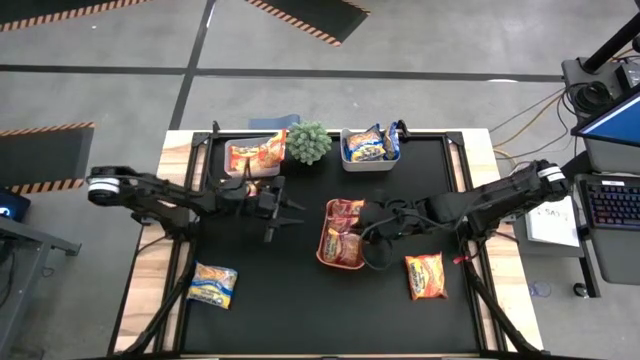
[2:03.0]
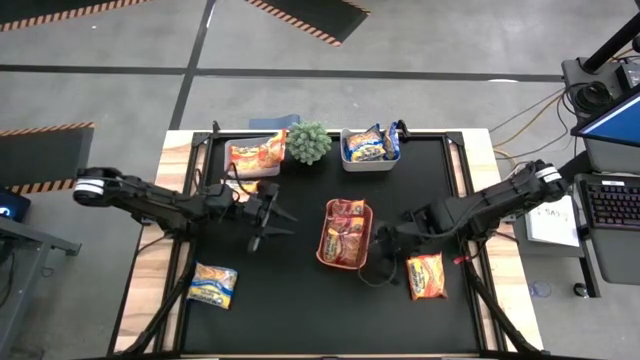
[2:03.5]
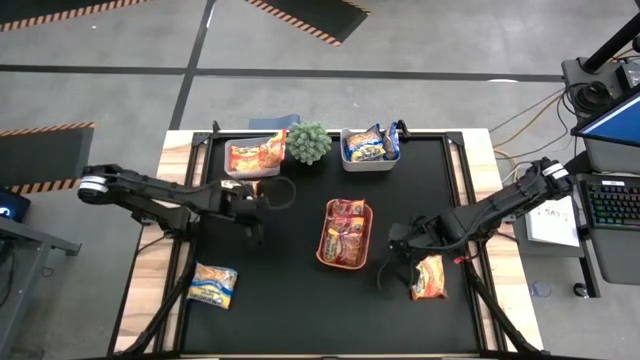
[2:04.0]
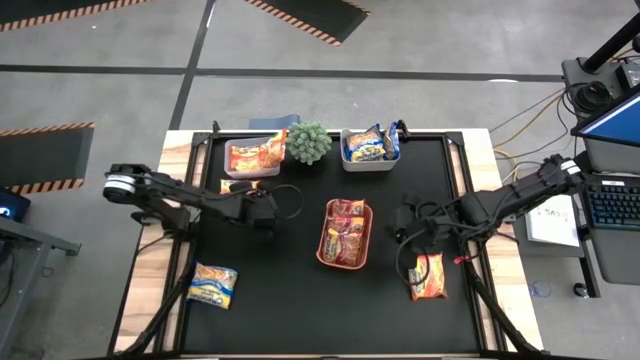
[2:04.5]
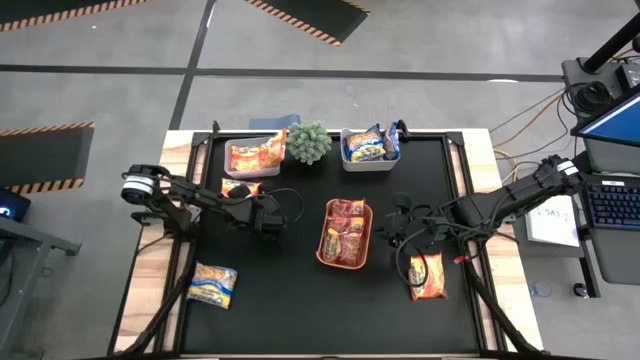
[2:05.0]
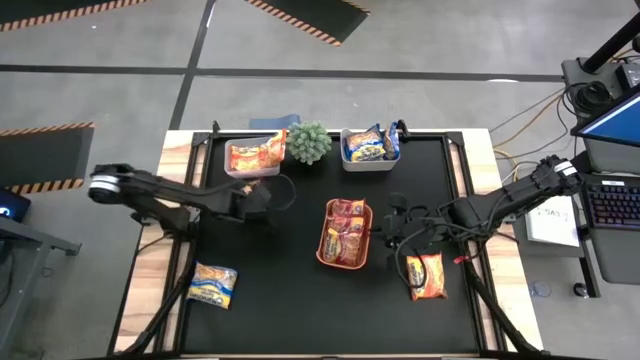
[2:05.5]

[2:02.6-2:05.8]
Task: Sort Maruchan noodles
Put the orange noodle pack into the transparent bin

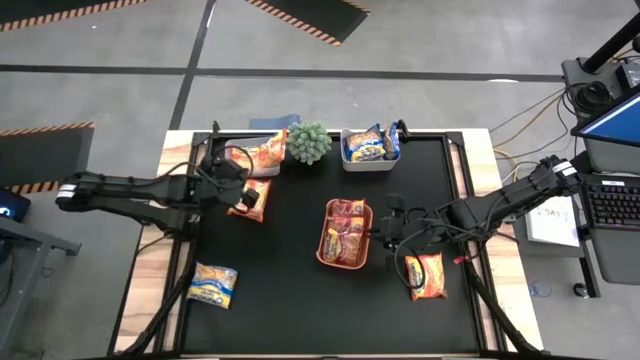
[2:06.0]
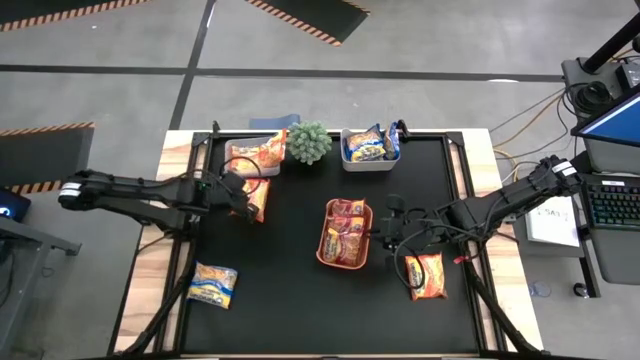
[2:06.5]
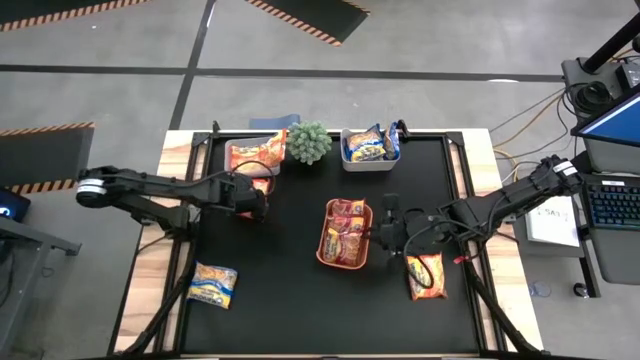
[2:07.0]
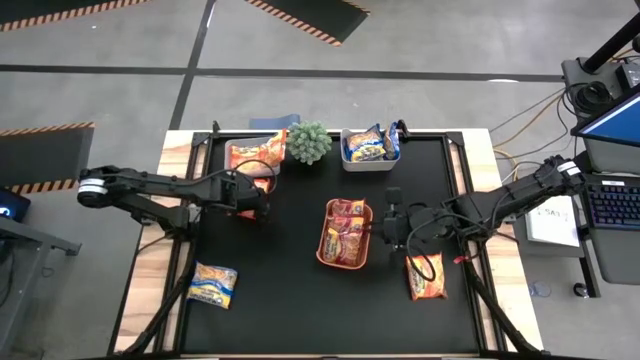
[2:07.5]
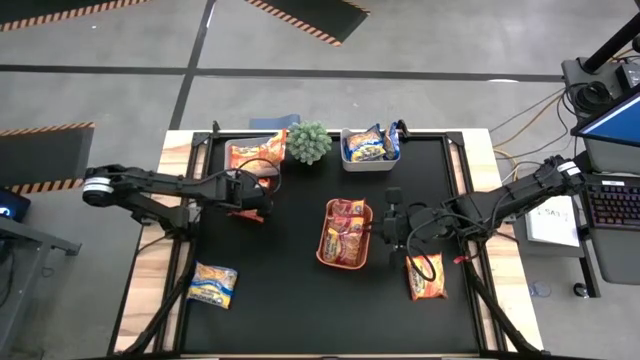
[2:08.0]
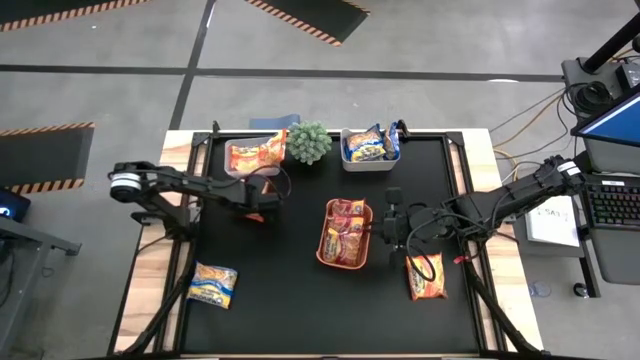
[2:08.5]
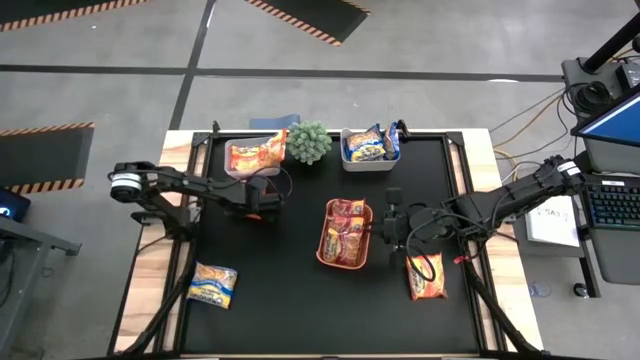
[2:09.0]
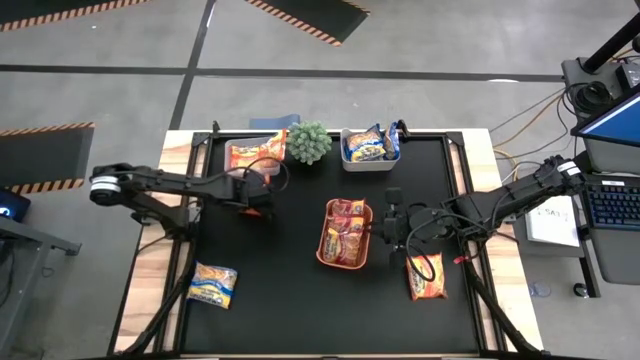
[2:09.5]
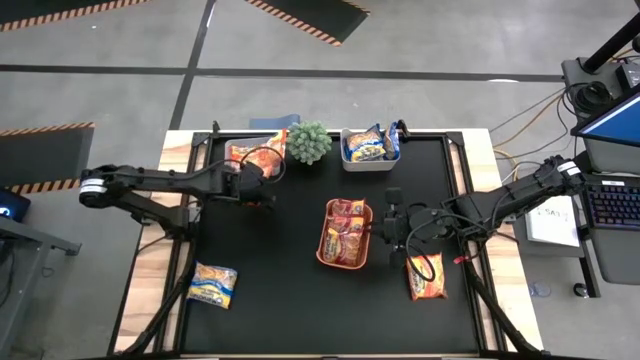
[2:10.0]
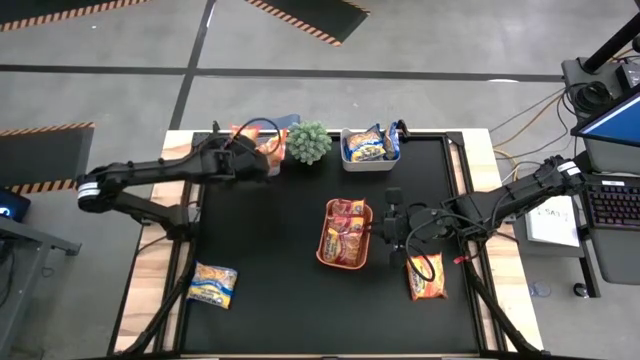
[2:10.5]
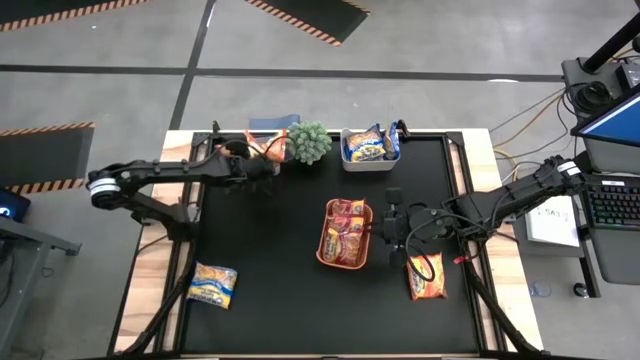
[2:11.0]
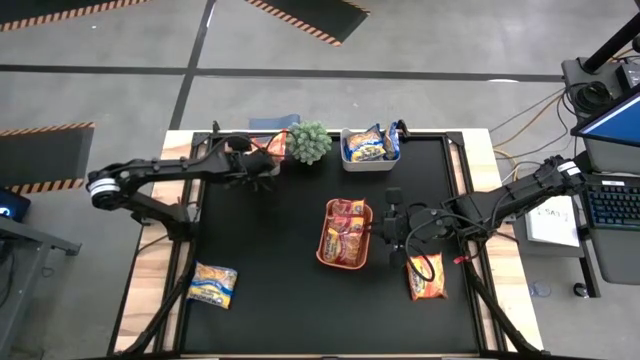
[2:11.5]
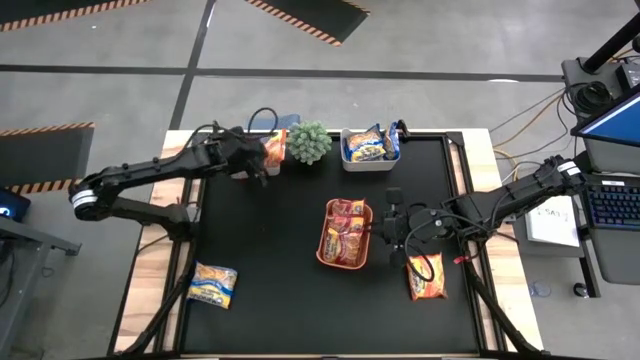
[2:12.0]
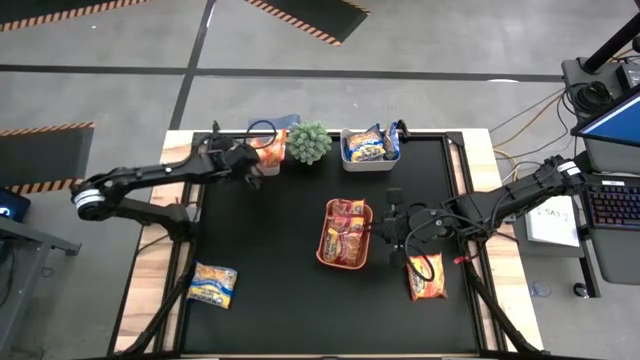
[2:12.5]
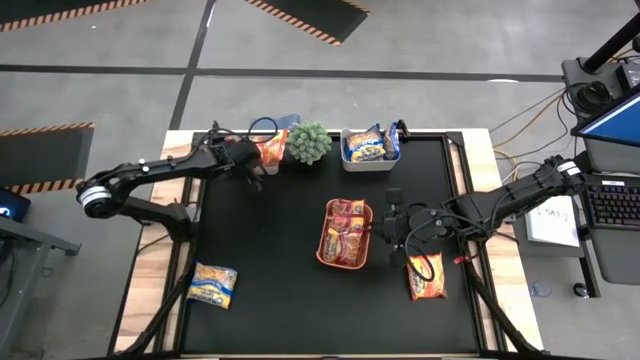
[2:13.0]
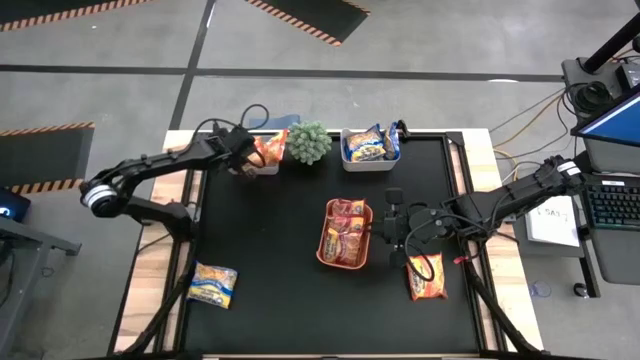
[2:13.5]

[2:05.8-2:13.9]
Put the orange noodle pack into the transparent bin

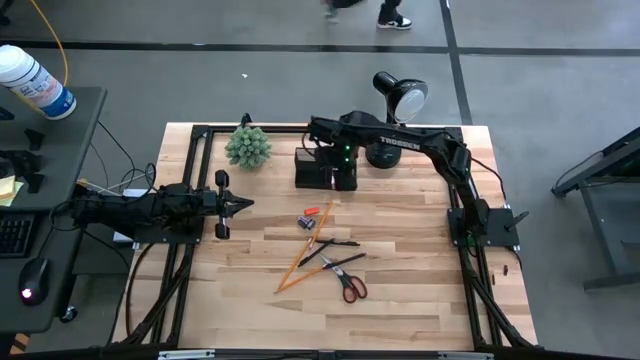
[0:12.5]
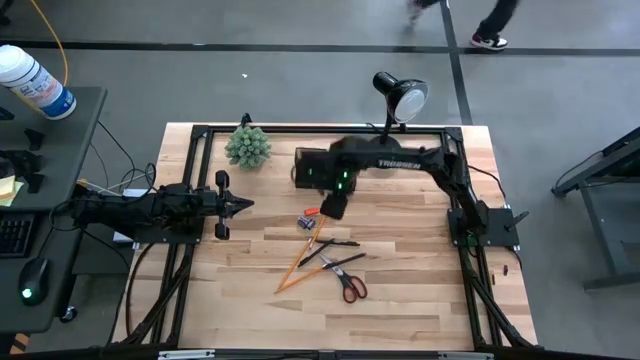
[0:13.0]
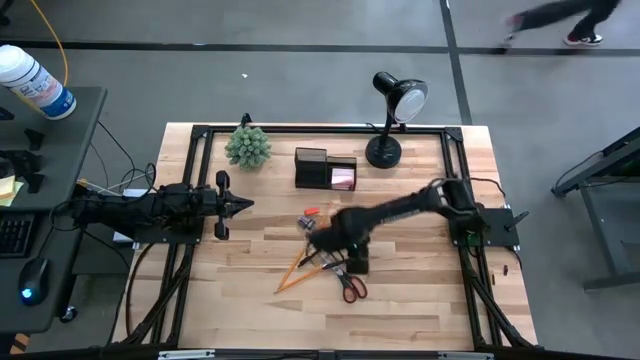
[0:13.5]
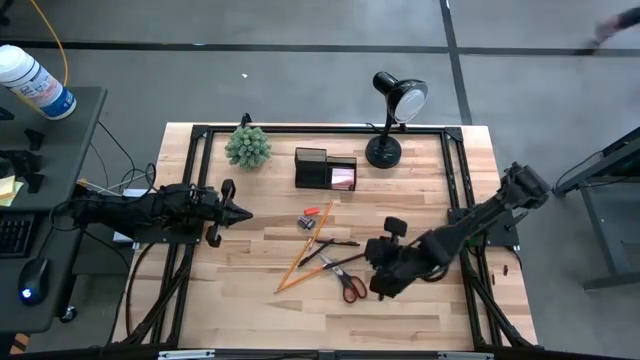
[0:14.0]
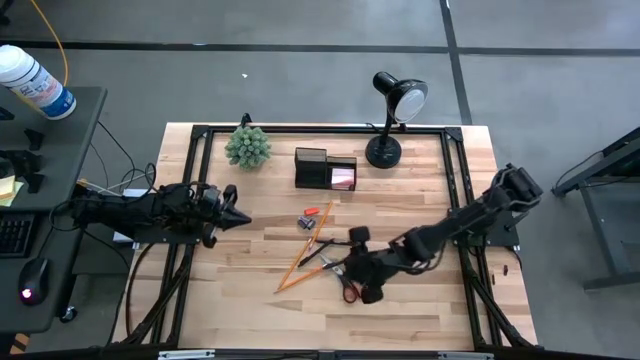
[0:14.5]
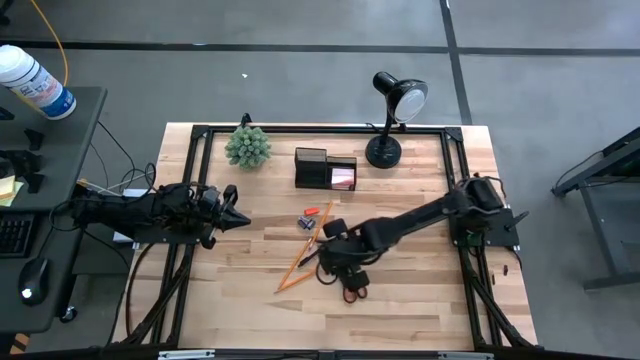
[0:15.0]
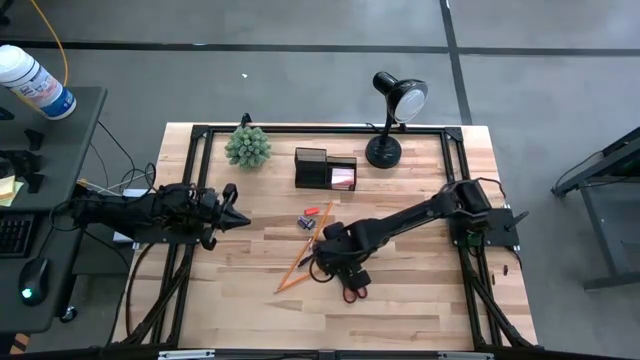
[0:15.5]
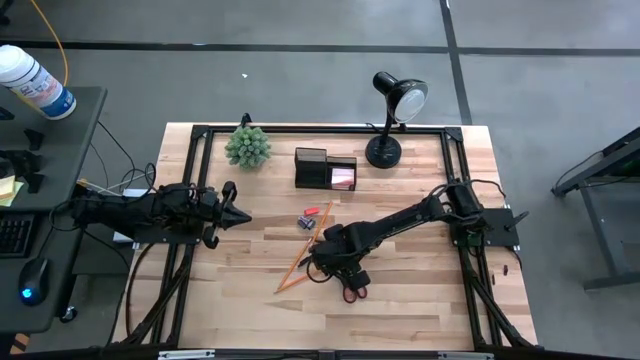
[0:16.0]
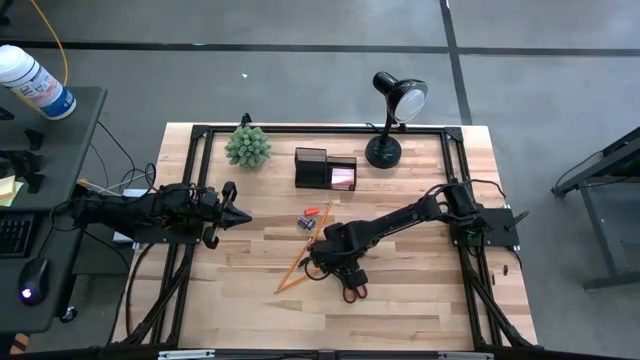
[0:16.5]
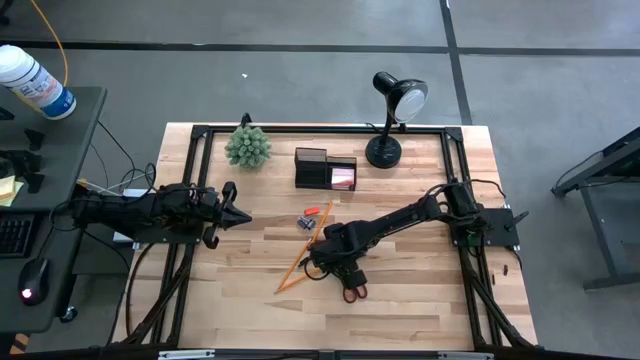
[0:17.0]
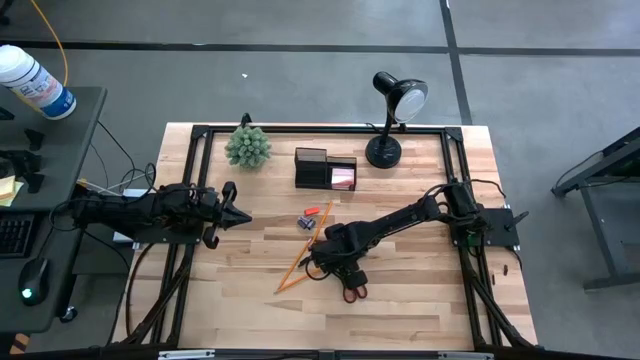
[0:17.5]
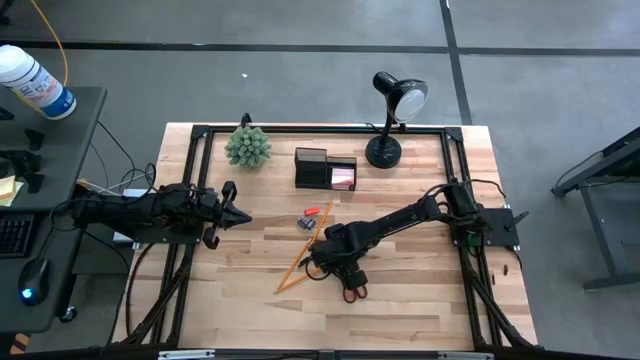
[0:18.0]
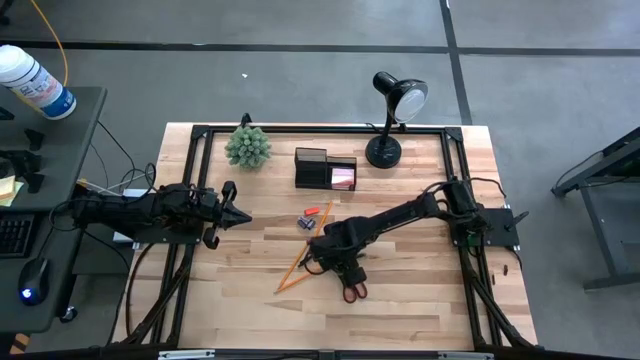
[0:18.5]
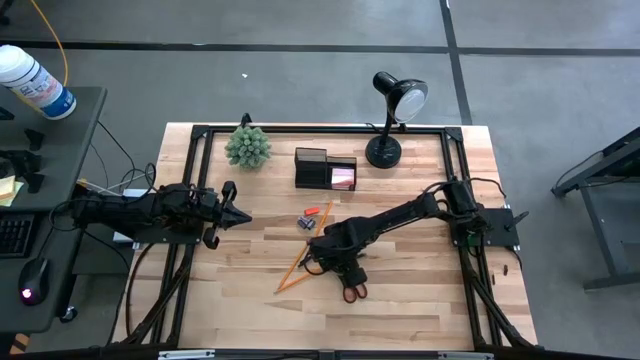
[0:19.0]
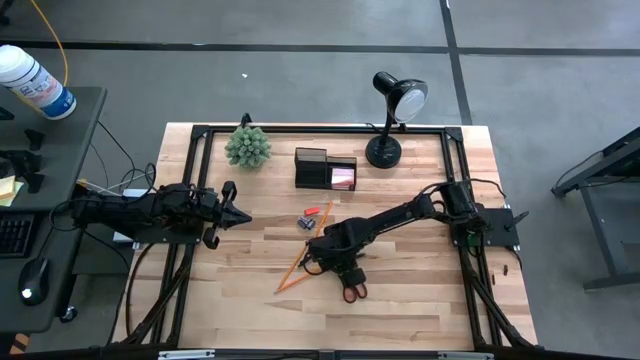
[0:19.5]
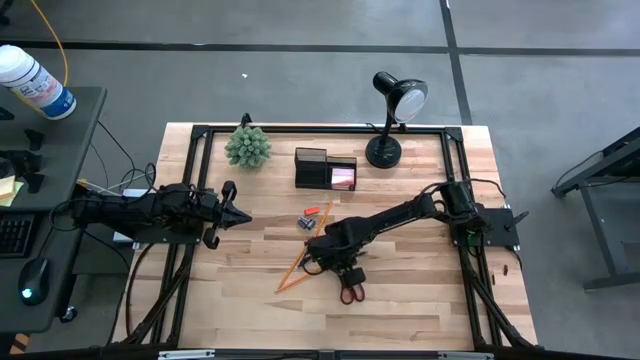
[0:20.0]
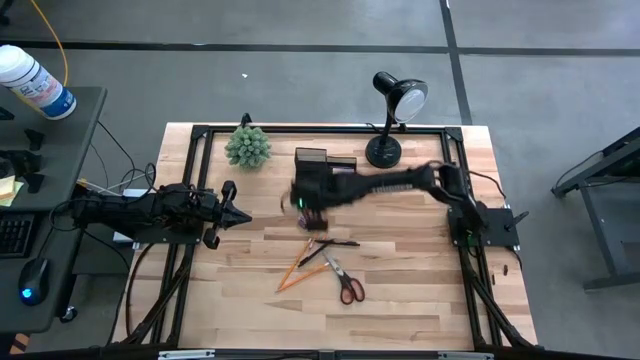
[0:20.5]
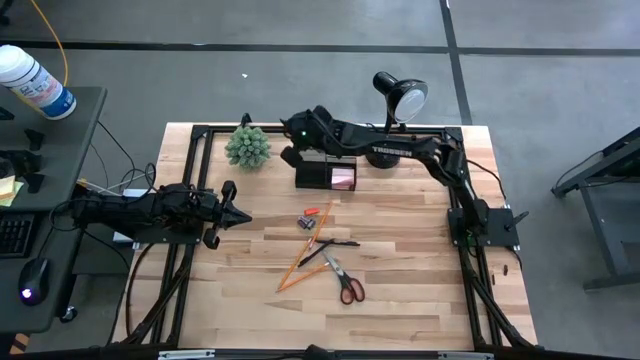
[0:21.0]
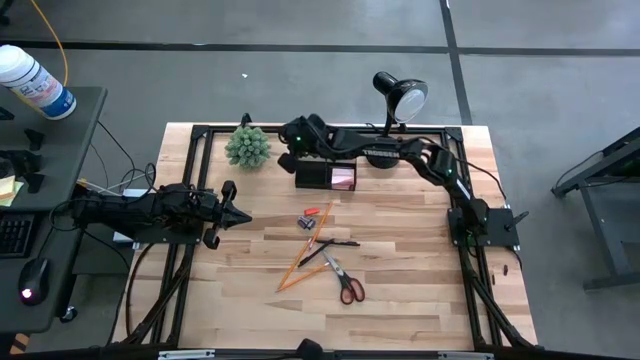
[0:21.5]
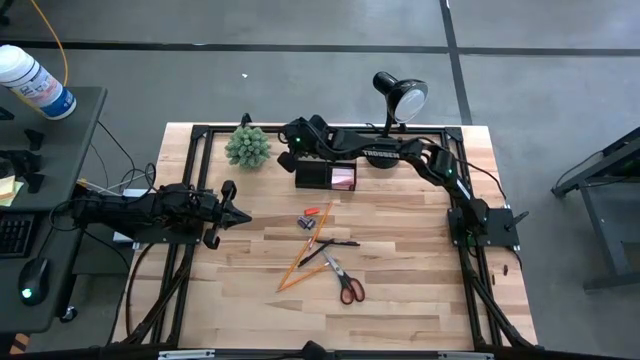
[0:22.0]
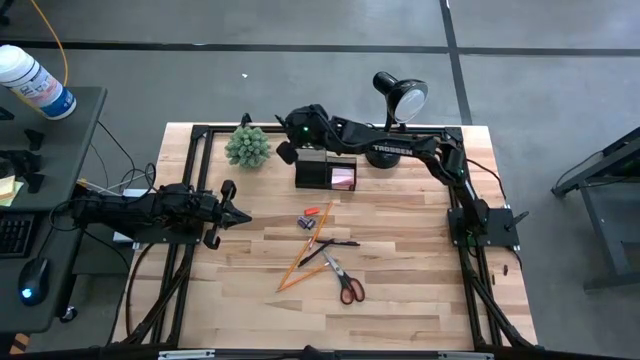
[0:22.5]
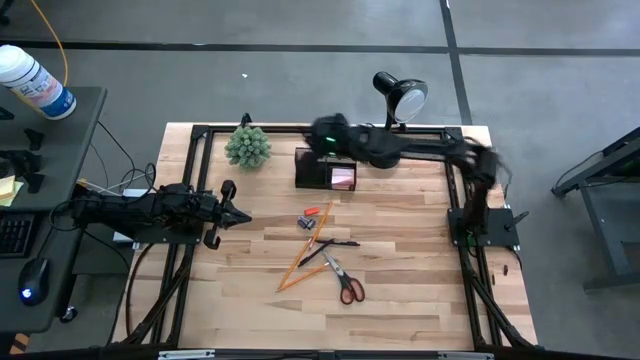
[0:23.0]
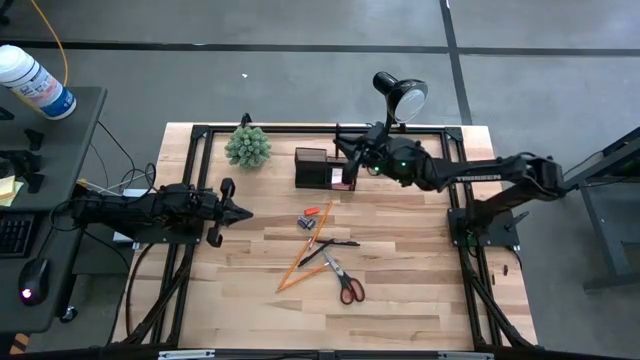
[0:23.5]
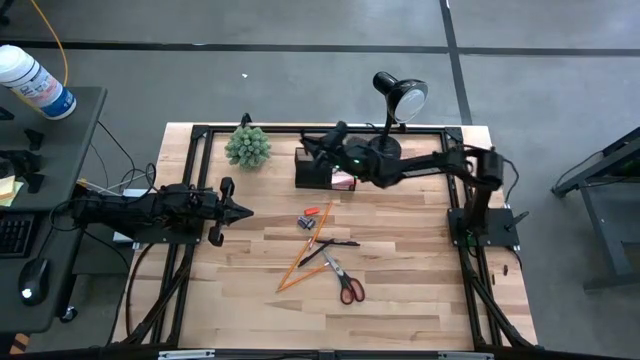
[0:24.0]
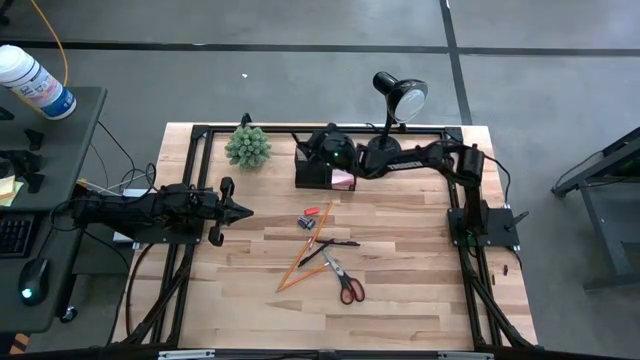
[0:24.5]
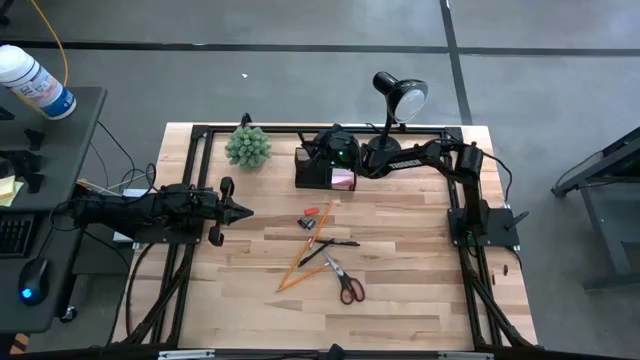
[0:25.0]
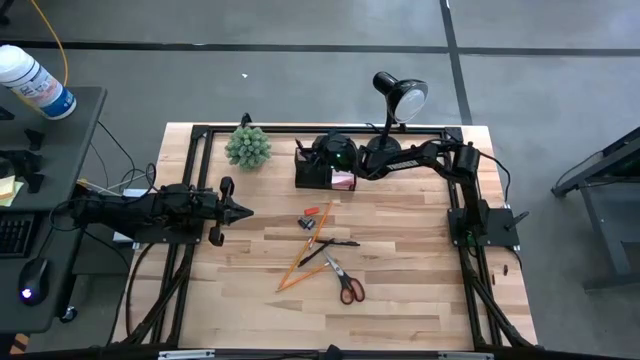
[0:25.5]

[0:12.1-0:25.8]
Task: Pick and place office supplies into organizer
Put the bottom black pen into the desk organizer
